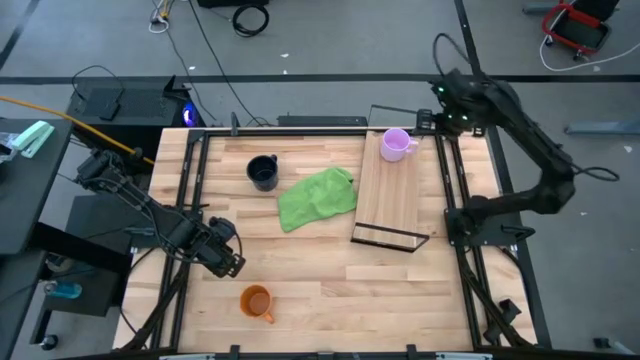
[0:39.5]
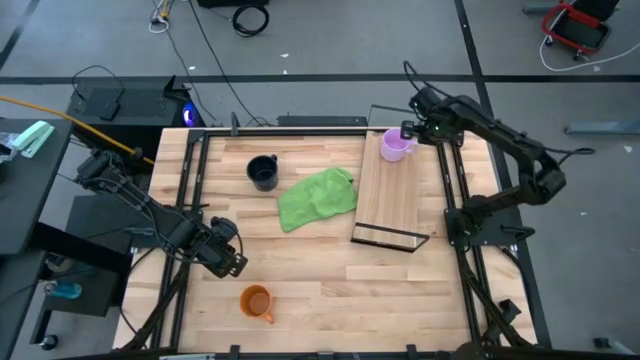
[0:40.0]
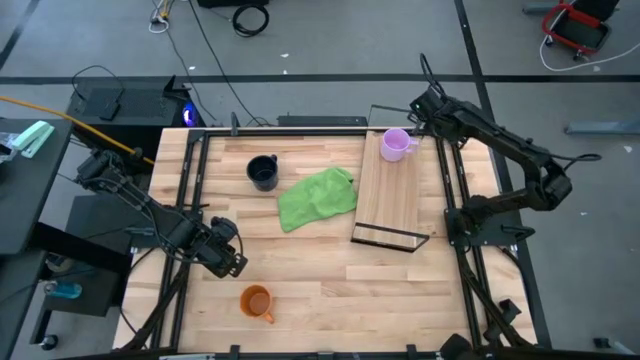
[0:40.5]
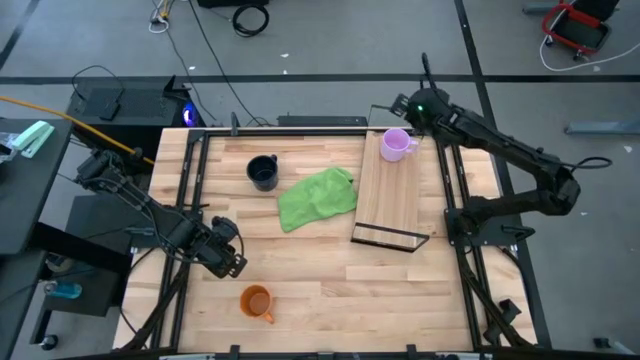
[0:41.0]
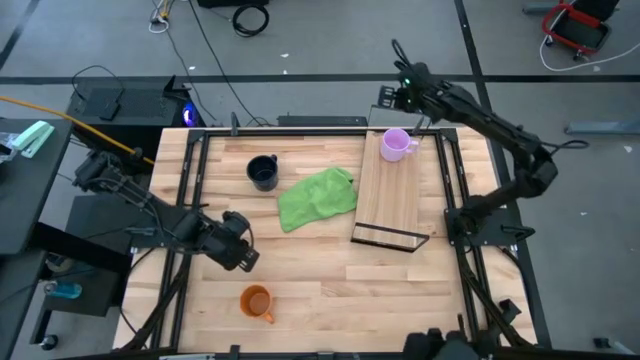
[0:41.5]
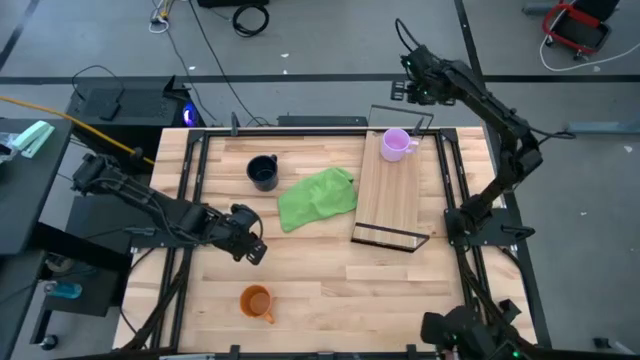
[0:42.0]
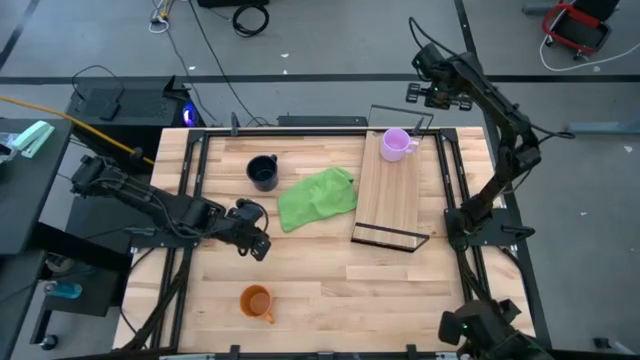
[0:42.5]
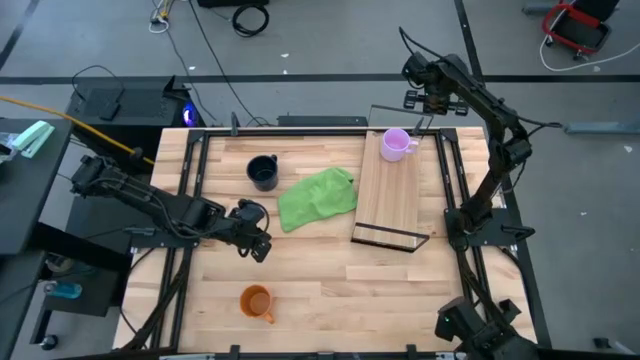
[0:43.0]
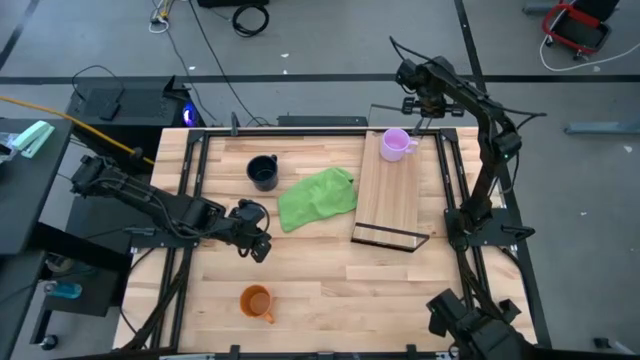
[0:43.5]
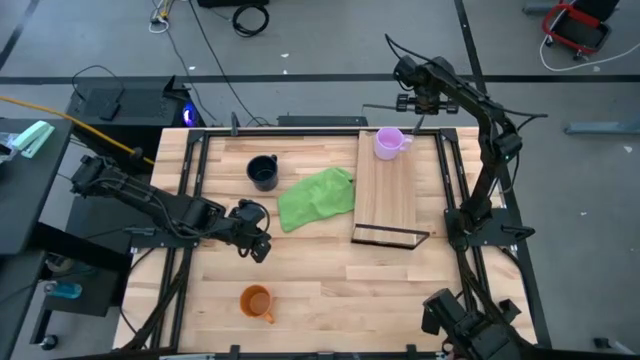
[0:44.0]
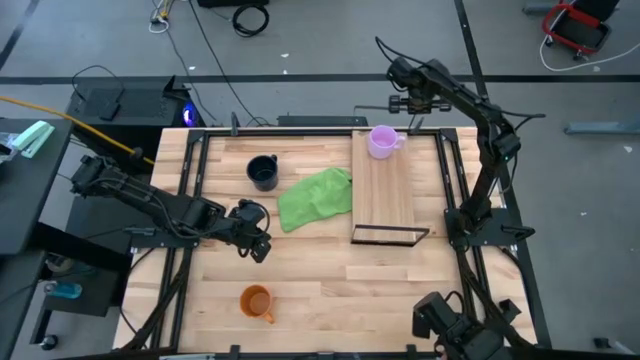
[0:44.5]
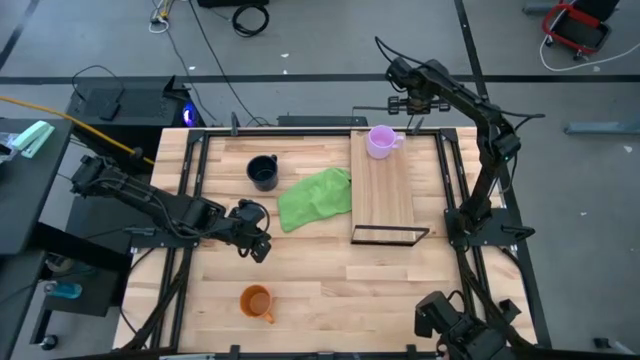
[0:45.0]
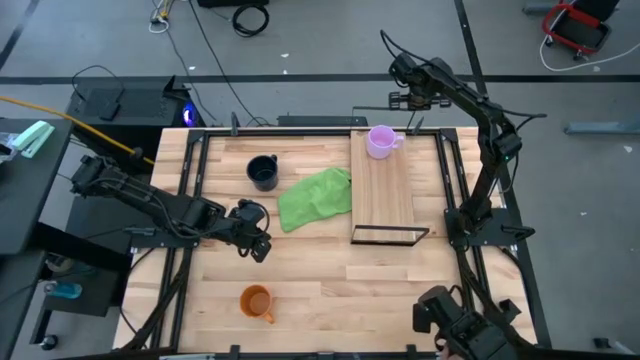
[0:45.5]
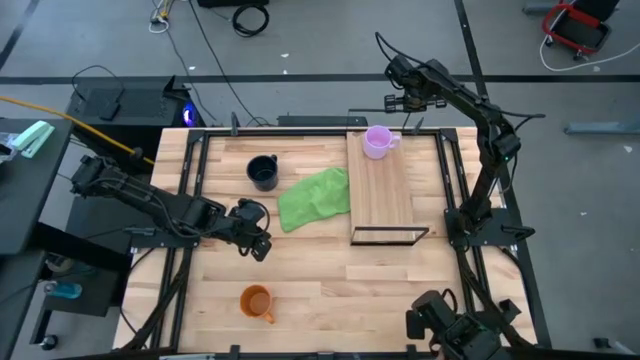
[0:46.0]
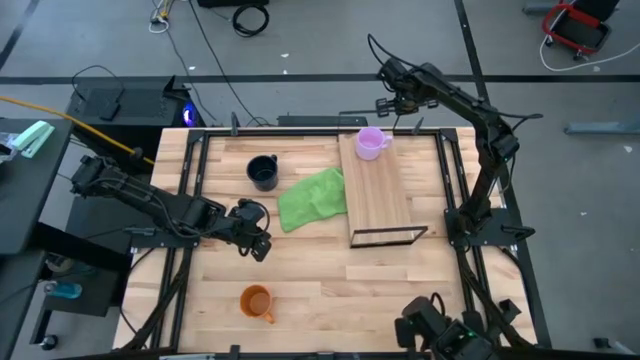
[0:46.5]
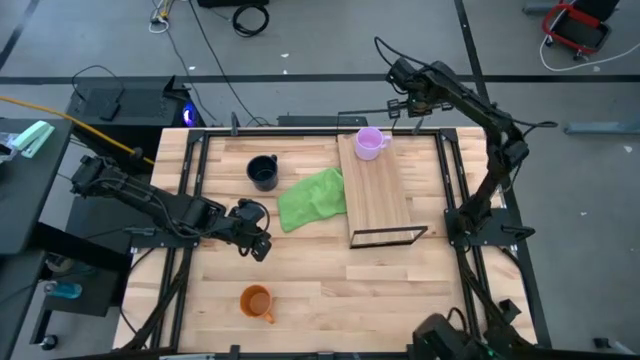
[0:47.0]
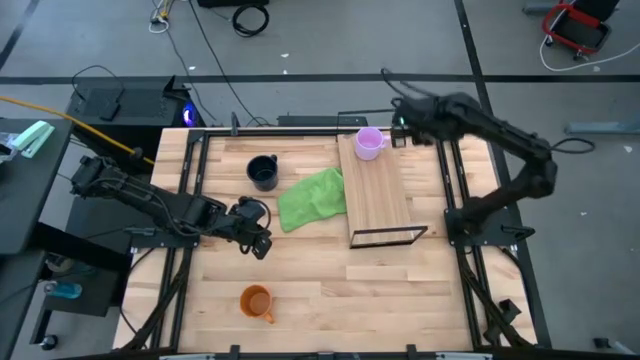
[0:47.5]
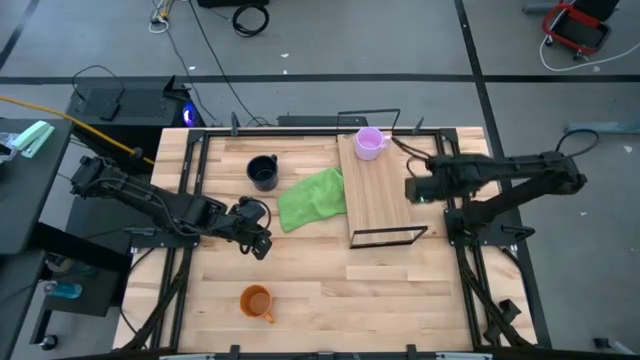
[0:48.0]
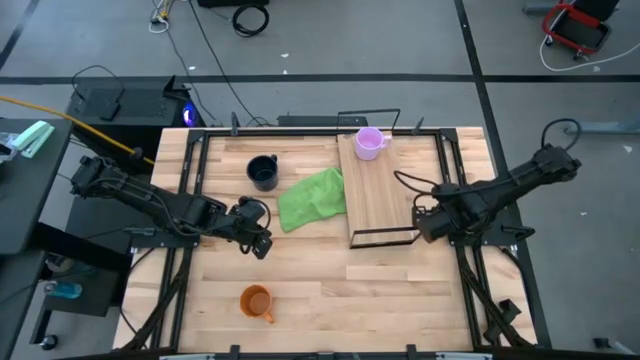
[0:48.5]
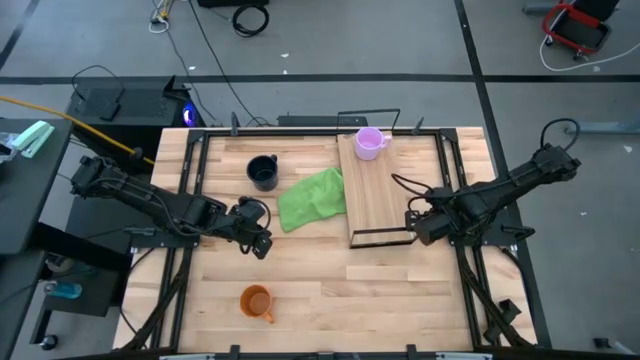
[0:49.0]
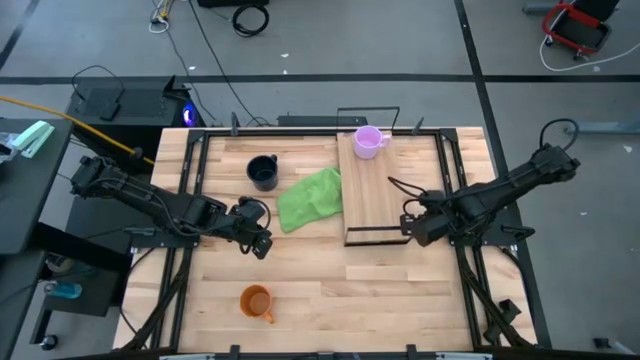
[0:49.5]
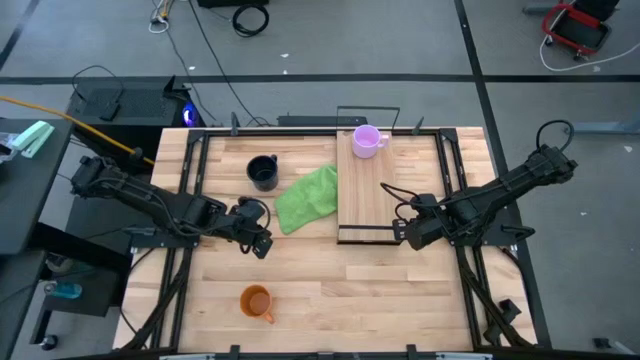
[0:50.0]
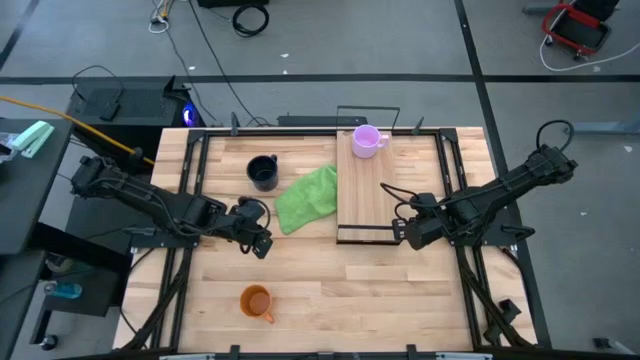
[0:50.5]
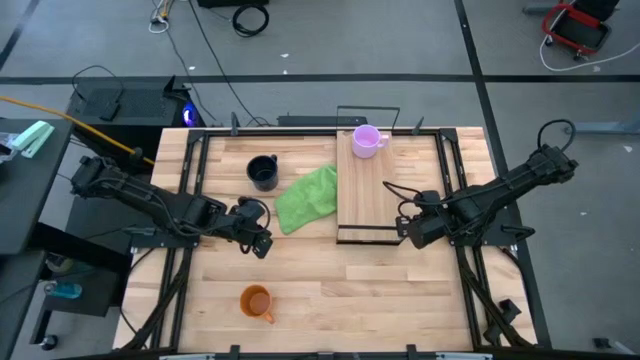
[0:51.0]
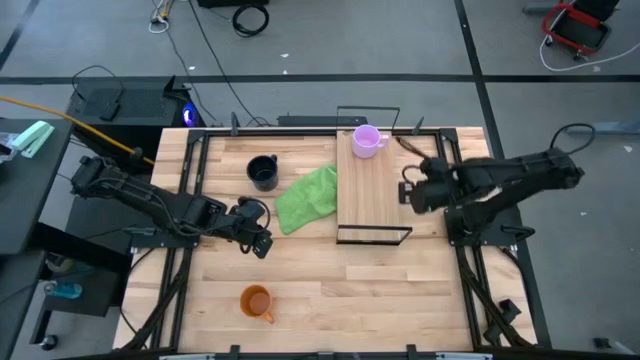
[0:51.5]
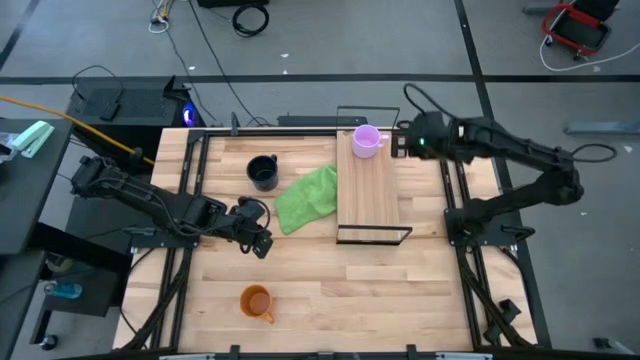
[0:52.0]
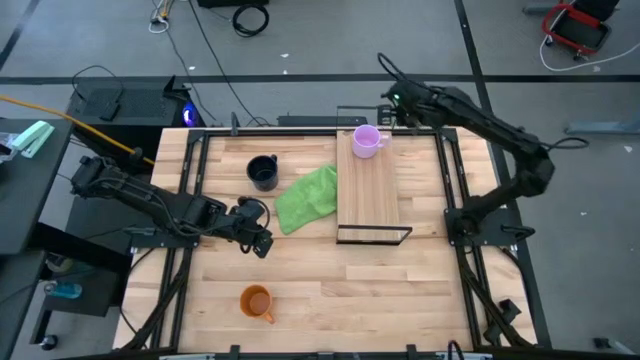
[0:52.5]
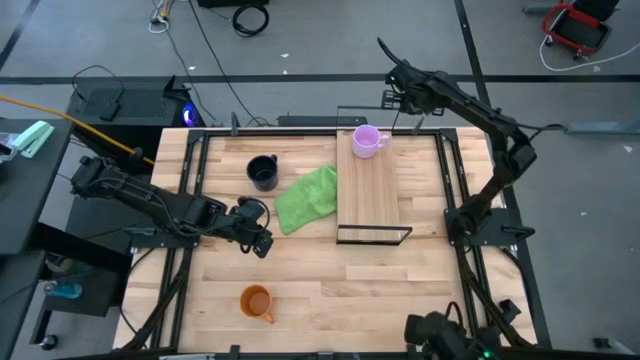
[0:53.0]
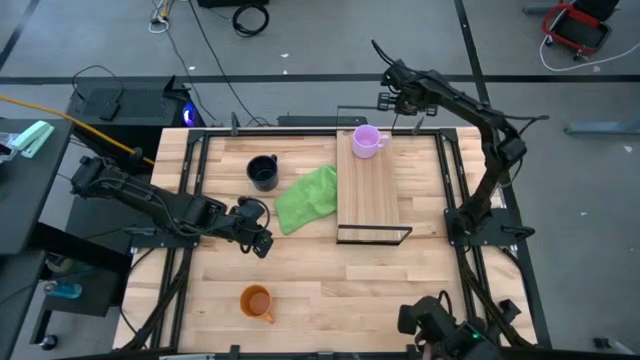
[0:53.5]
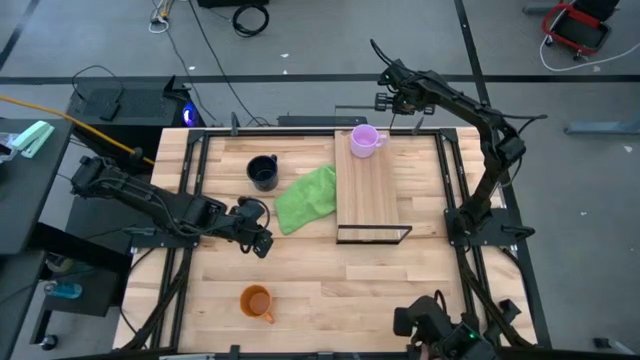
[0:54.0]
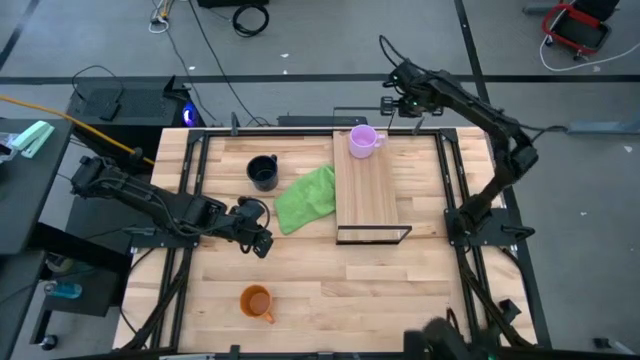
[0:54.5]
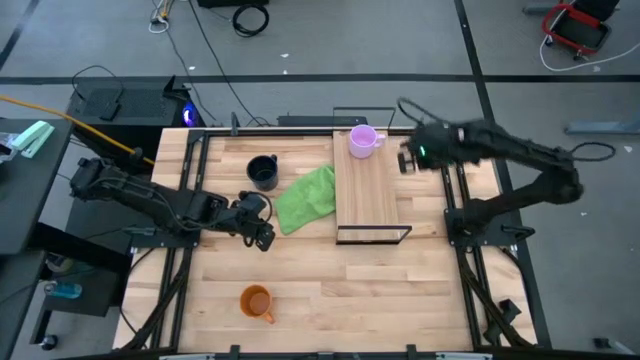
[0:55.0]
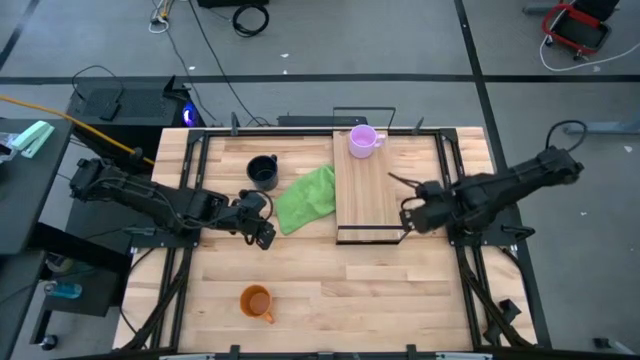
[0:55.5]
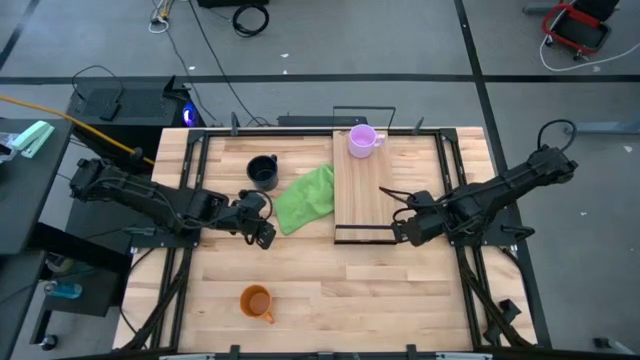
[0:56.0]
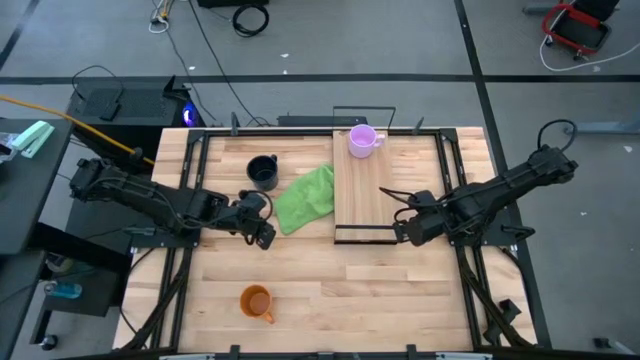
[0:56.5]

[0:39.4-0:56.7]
Task: Stack small to large cups/mugs on shelf
Move the shelf to the center

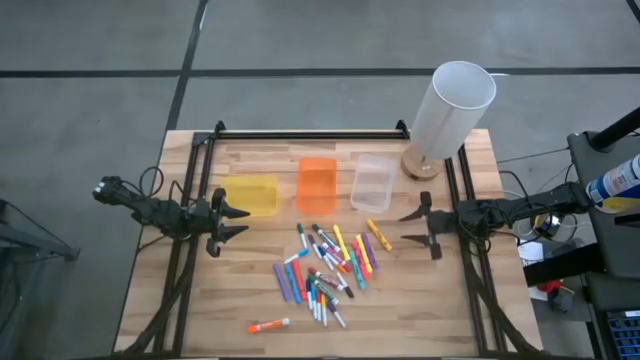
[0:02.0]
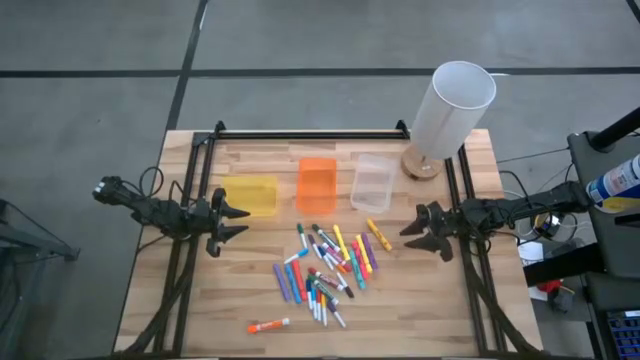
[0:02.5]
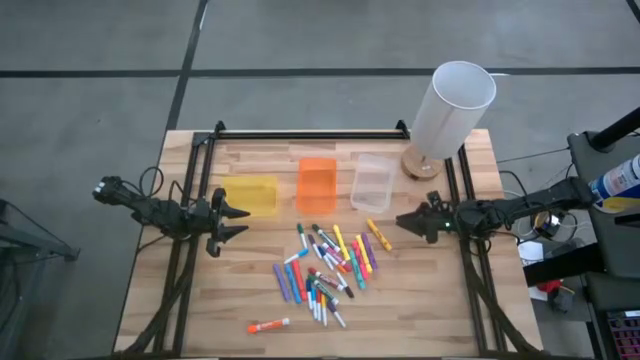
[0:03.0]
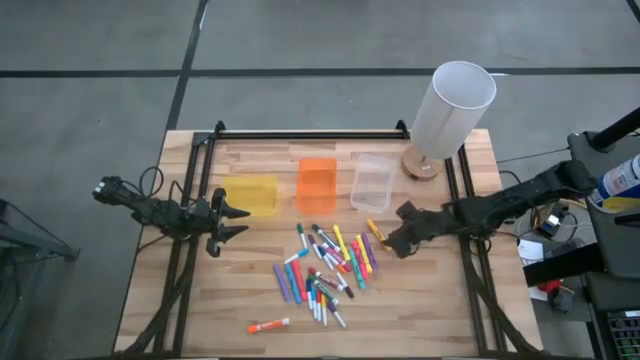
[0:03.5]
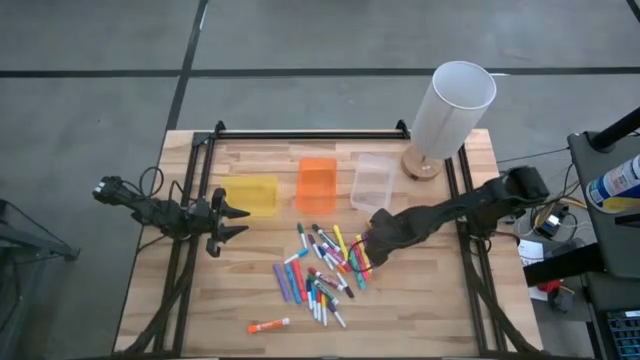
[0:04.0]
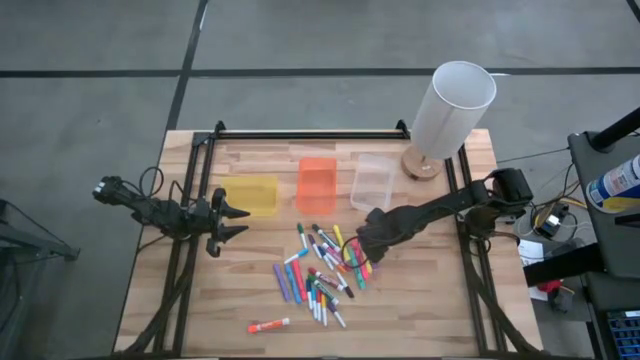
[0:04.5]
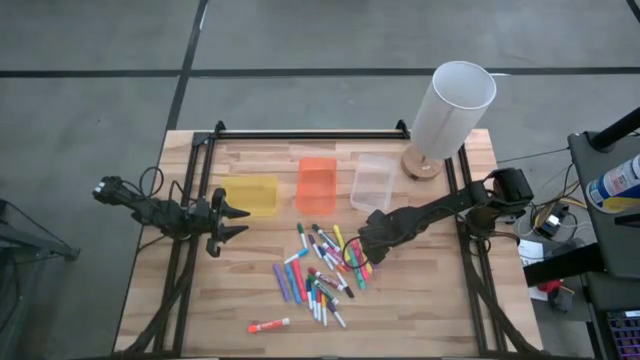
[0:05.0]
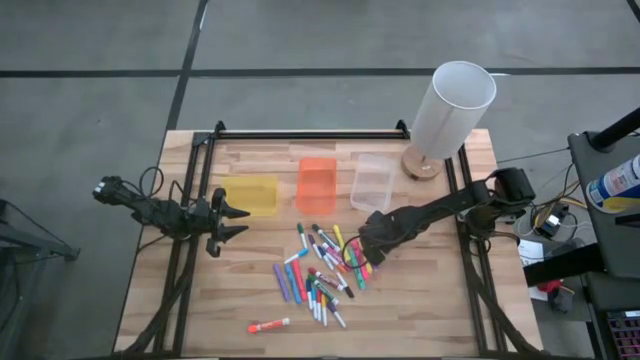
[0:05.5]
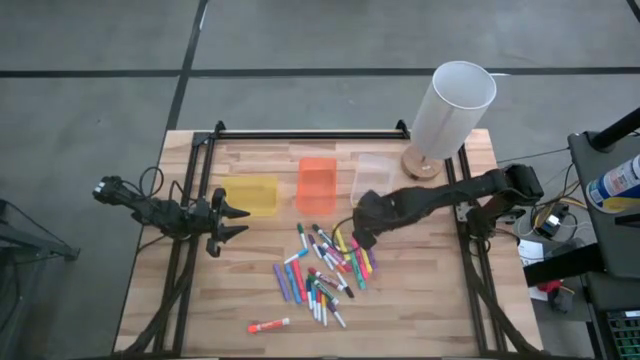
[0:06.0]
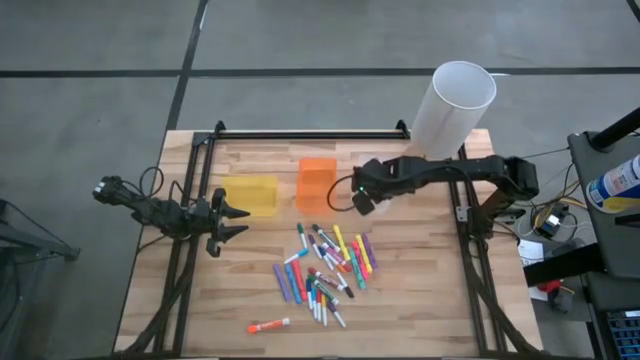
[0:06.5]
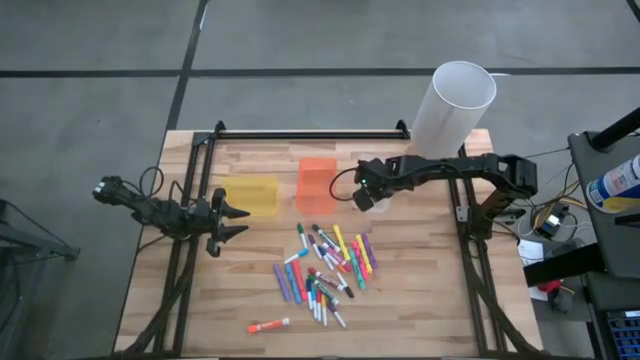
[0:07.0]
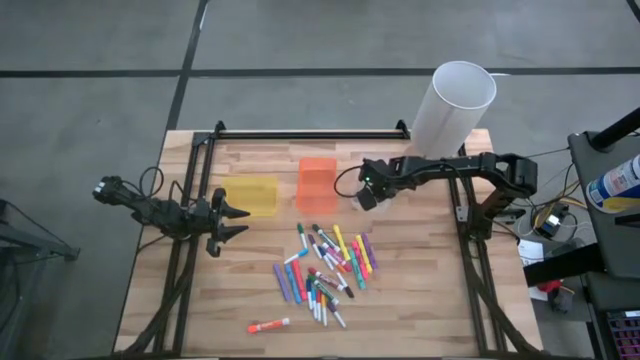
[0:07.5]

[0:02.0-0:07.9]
Task: Pick & Place Markers
Put the yellow highlighter into the transparent bin
